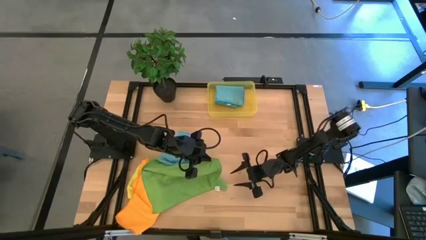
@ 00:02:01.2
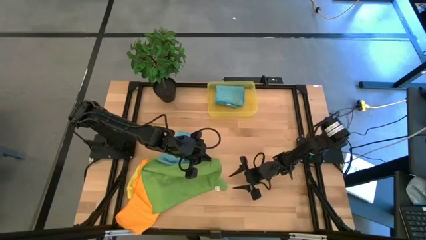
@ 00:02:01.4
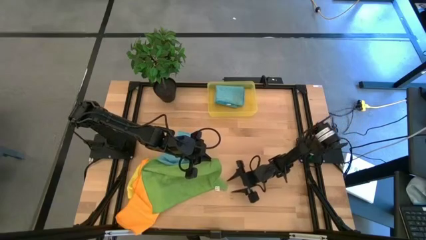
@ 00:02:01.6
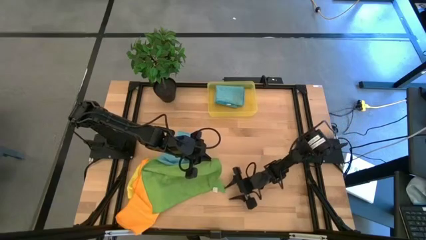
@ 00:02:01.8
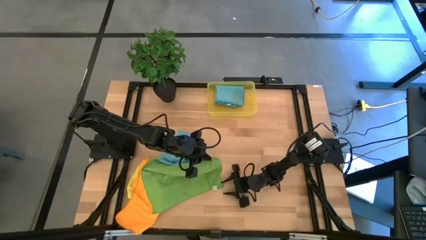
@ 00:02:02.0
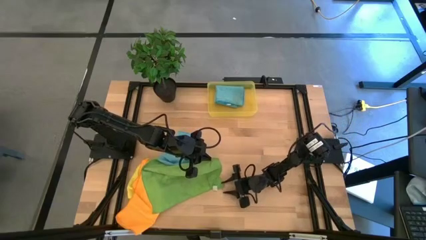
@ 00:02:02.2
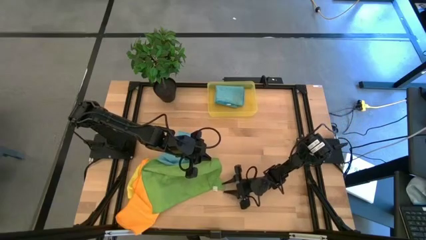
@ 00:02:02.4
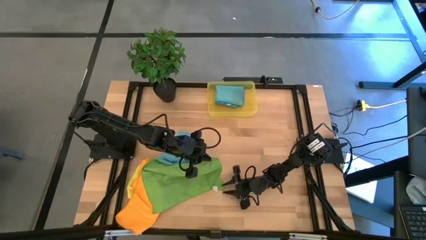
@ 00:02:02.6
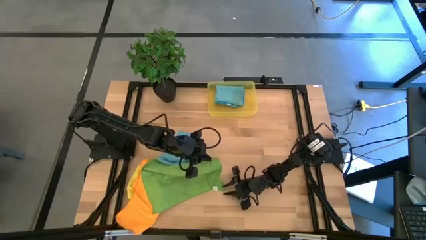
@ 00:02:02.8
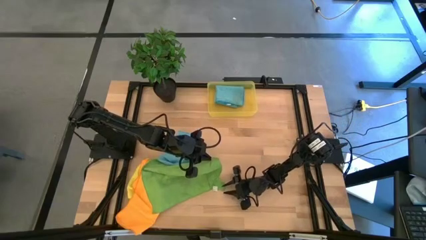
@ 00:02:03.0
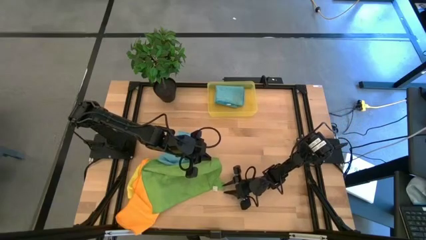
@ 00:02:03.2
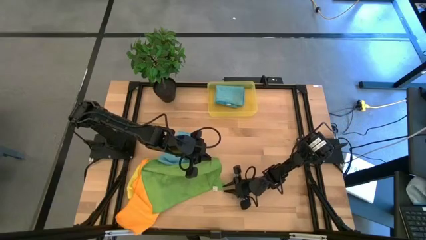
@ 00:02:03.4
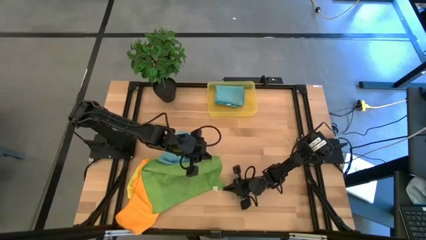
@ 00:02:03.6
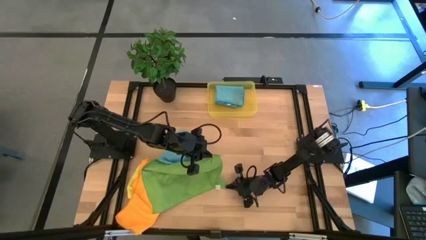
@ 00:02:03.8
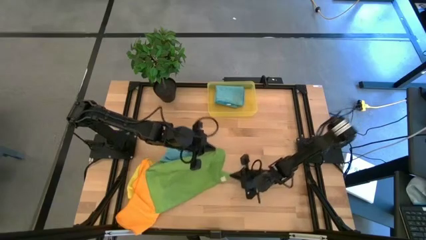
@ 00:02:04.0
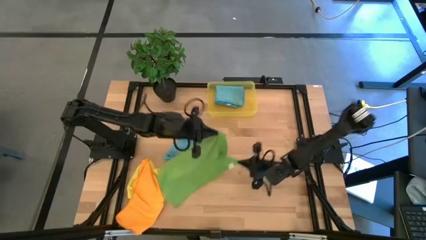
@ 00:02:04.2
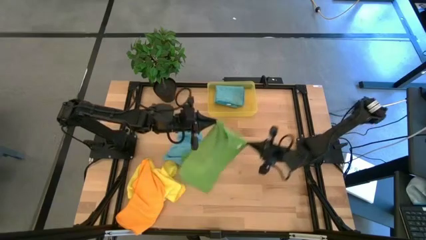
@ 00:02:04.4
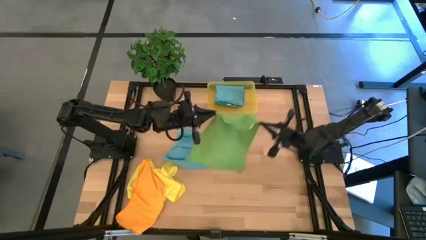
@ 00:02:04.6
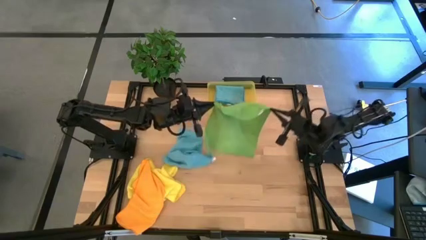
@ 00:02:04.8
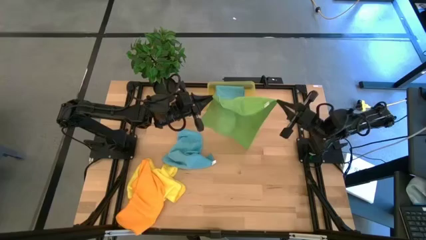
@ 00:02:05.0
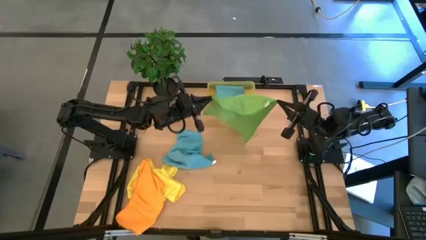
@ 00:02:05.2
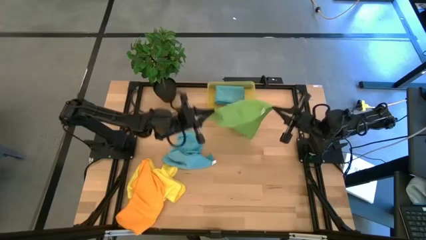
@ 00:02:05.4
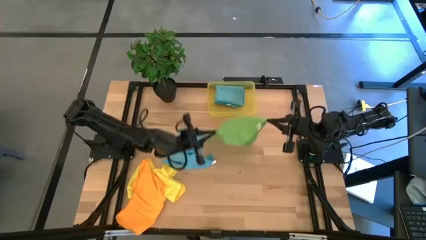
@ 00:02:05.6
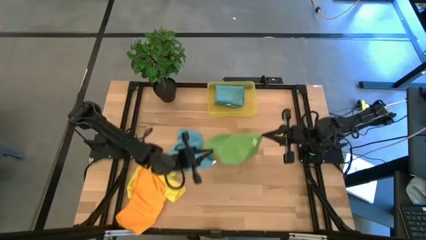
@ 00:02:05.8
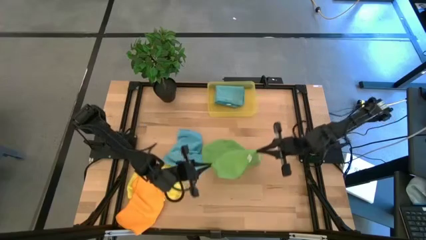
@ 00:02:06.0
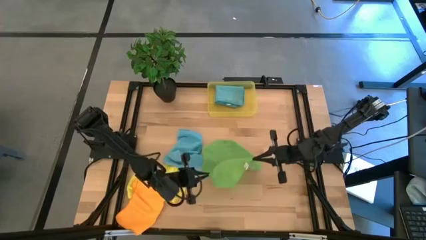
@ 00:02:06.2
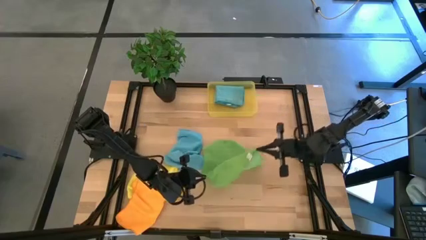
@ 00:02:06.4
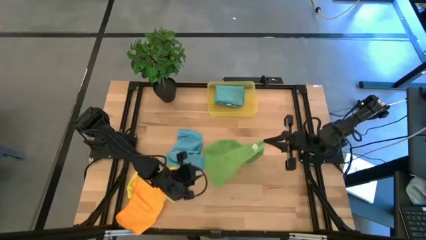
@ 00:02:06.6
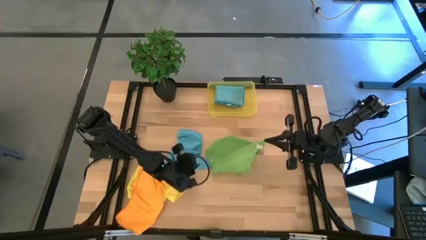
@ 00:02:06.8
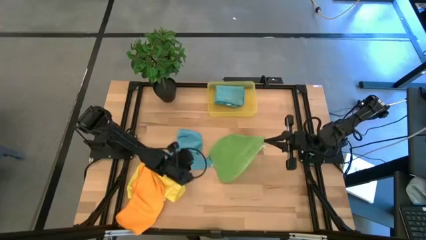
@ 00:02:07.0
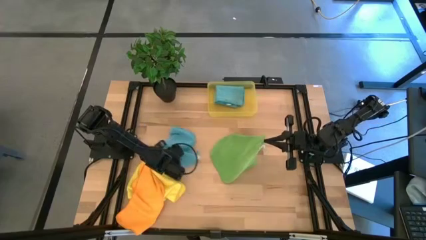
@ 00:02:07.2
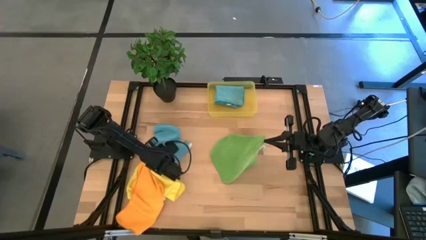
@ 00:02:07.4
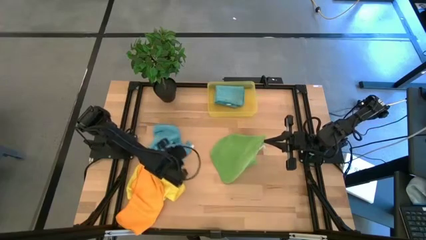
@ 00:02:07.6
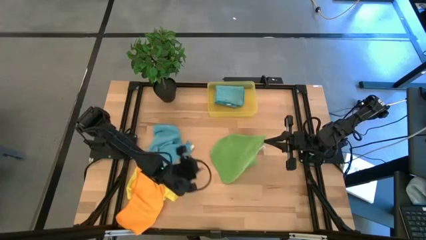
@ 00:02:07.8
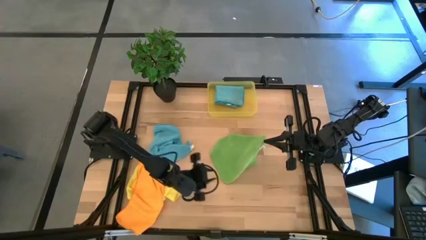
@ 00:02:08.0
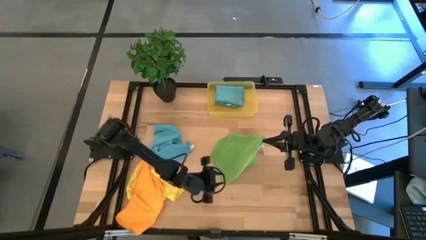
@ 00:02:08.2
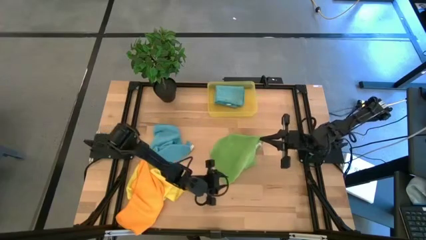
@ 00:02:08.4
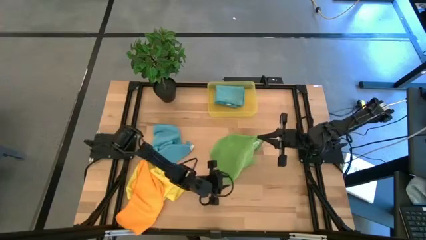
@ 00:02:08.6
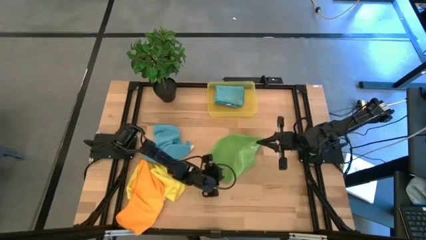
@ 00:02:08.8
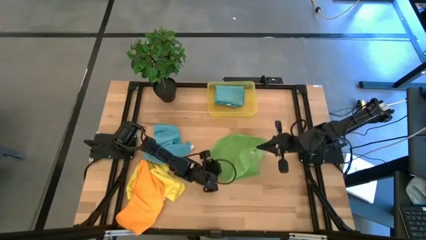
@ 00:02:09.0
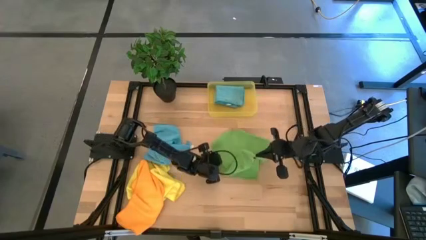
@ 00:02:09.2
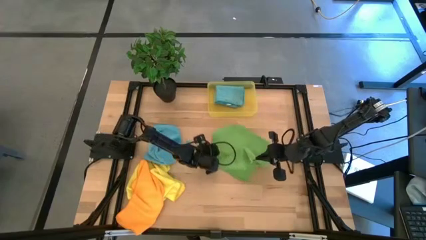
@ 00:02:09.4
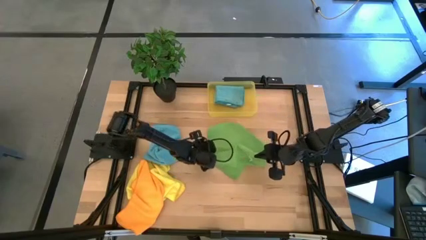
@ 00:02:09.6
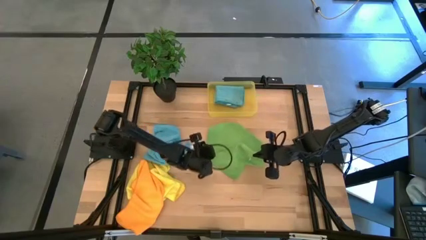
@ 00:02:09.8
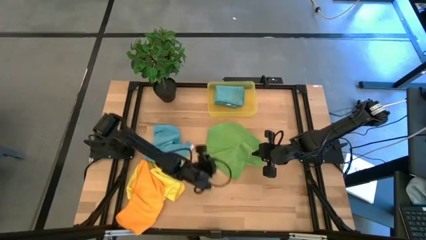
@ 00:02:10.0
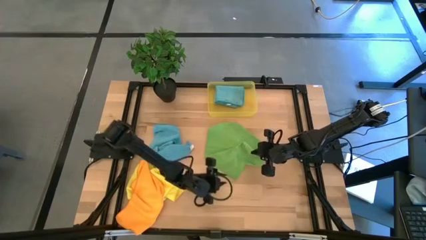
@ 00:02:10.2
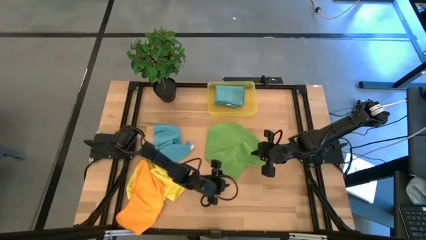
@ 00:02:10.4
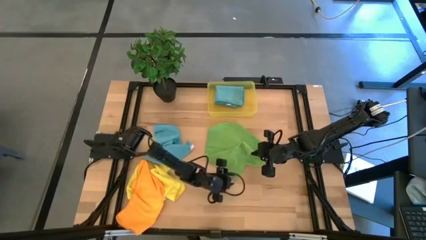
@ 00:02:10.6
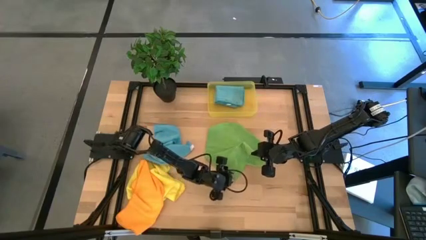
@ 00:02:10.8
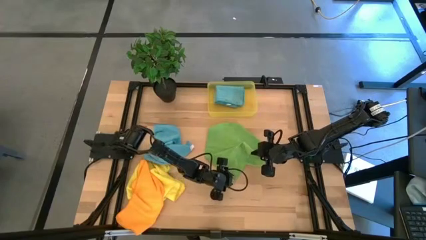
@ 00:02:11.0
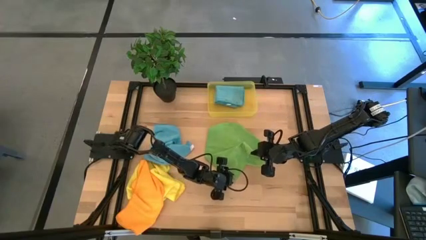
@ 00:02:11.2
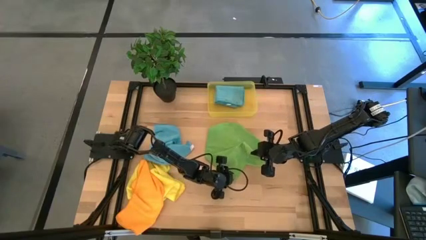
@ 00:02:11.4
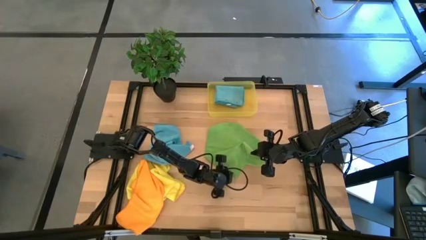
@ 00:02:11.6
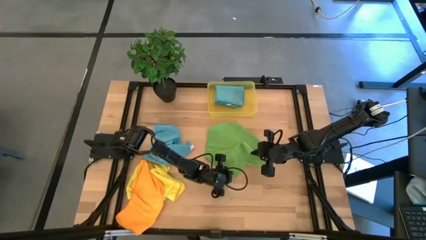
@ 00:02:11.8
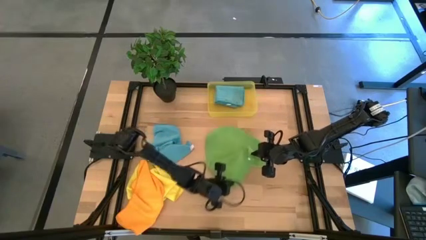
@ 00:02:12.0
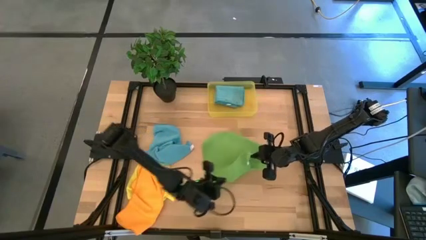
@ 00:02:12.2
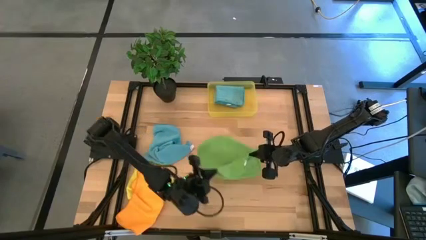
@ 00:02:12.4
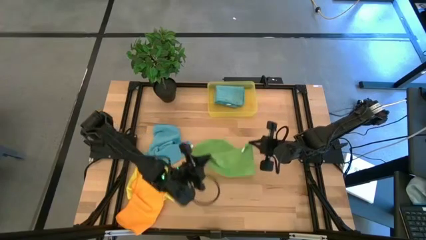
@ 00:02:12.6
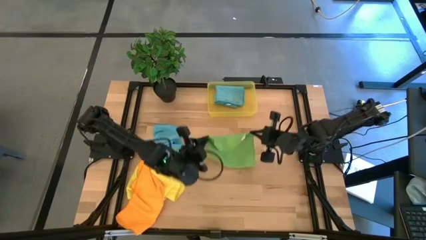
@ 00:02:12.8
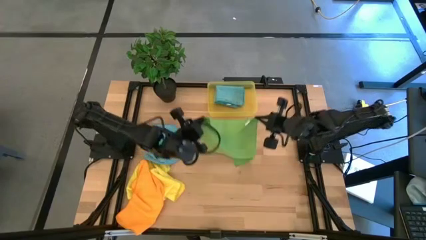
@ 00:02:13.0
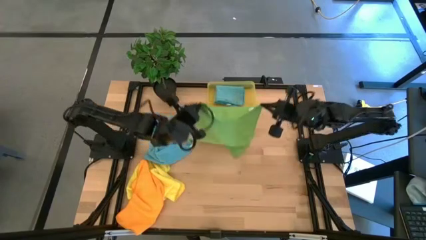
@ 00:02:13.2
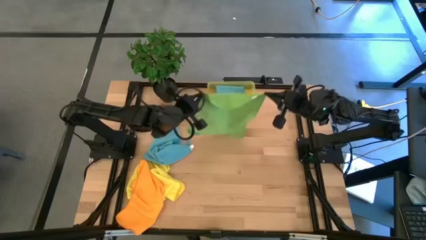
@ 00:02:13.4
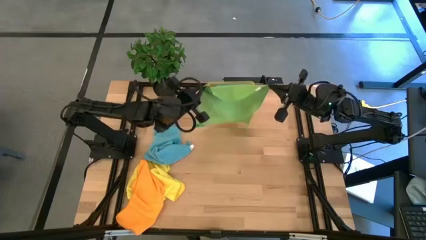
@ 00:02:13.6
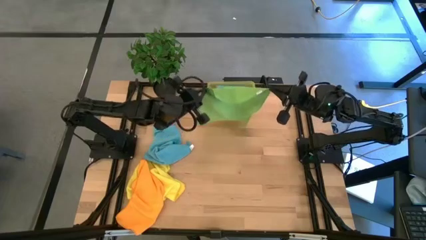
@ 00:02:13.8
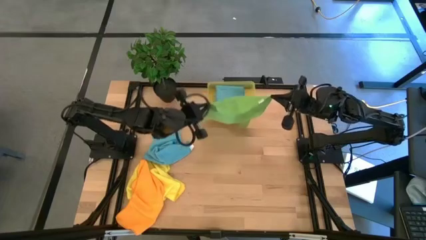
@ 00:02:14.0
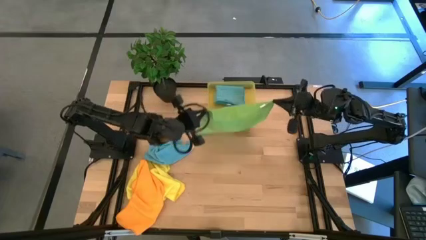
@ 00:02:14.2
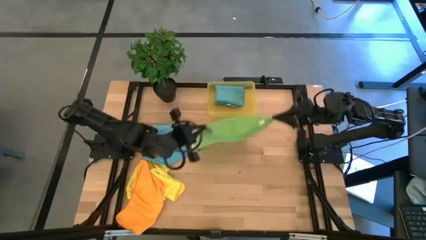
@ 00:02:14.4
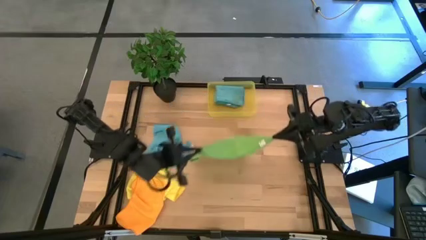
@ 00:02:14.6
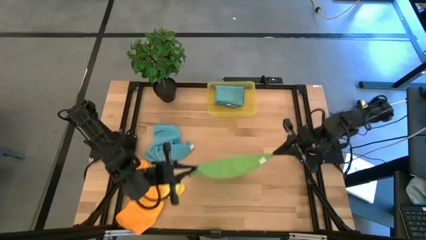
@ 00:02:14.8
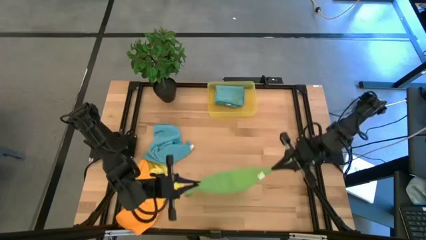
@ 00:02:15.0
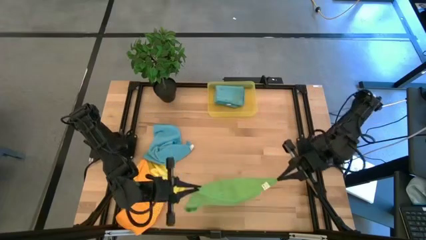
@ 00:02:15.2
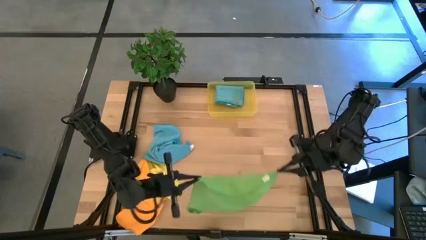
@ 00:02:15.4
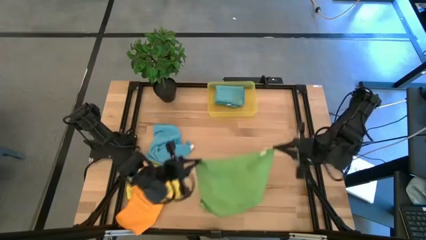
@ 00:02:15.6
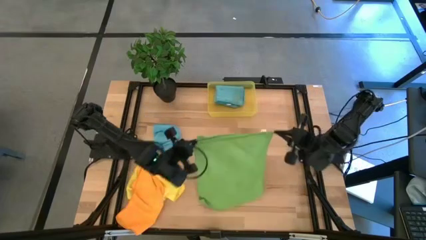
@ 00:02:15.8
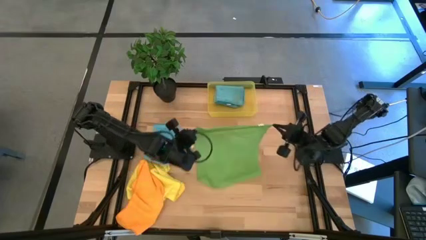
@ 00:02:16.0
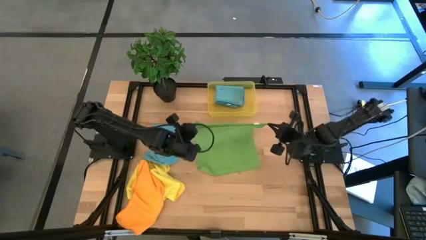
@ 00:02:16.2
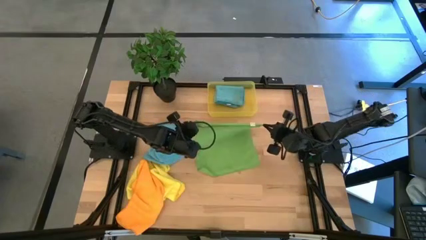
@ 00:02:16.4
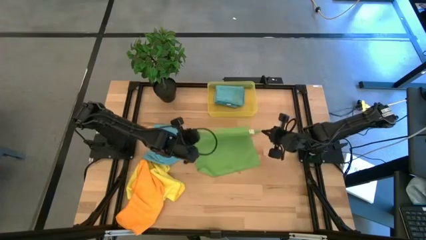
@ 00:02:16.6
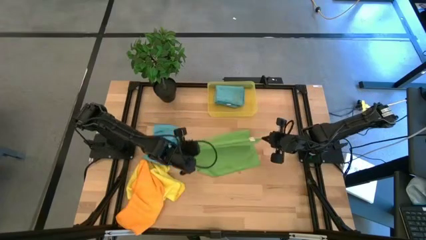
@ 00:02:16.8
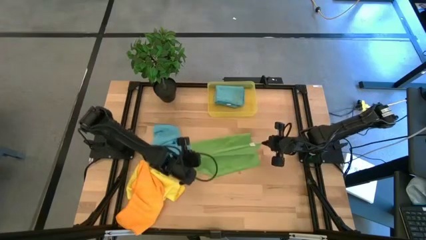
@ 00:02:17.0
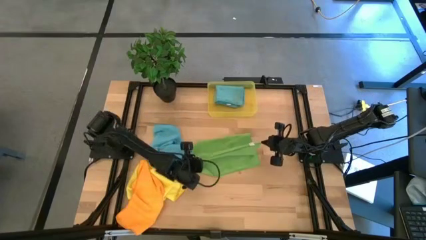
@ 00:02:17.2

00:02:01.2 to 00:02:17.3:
Task: Fold microfiber towels
Fold the green microfiber towel
